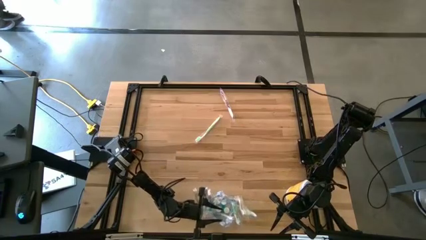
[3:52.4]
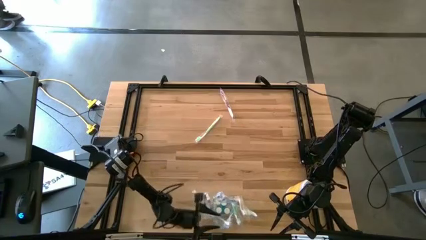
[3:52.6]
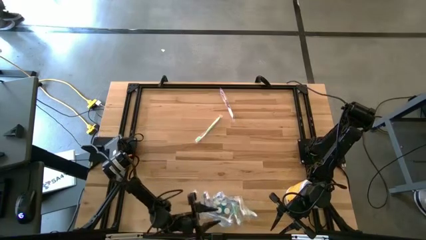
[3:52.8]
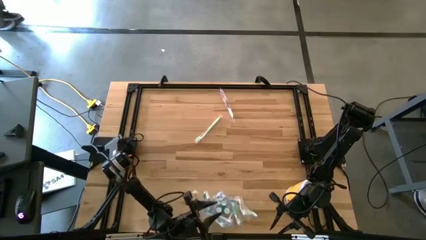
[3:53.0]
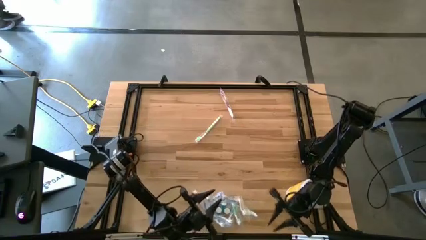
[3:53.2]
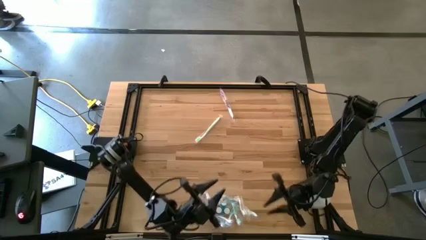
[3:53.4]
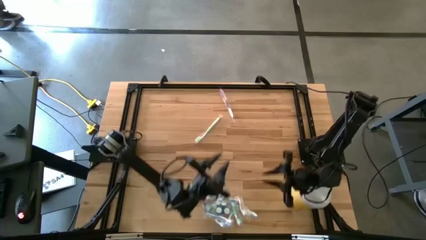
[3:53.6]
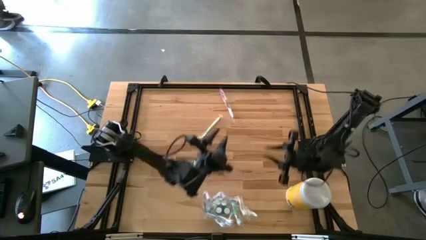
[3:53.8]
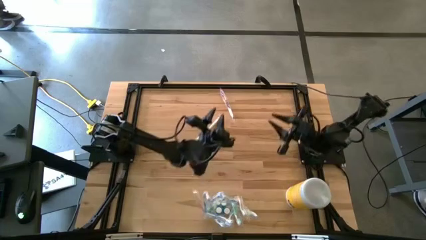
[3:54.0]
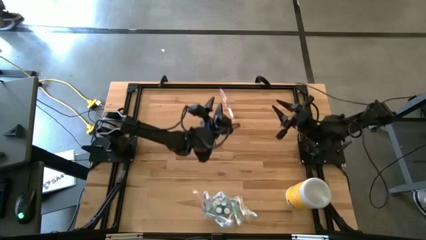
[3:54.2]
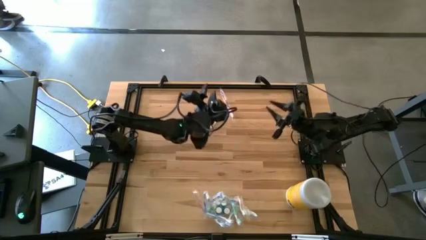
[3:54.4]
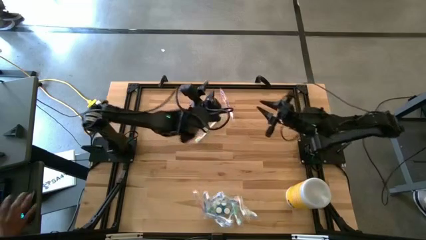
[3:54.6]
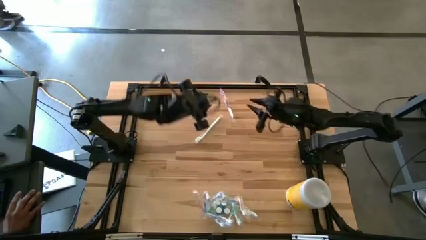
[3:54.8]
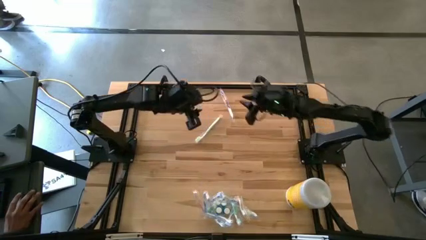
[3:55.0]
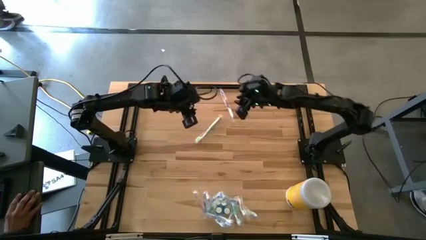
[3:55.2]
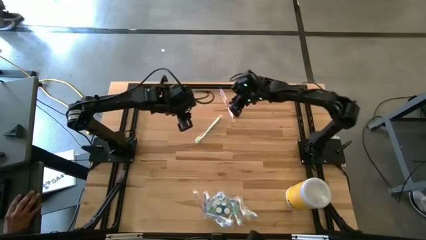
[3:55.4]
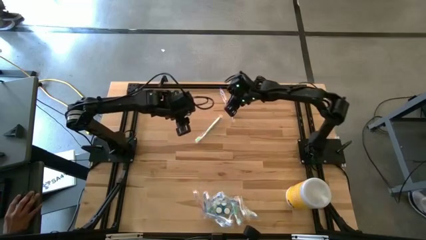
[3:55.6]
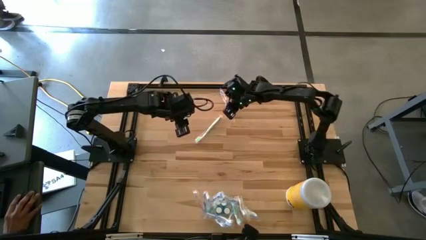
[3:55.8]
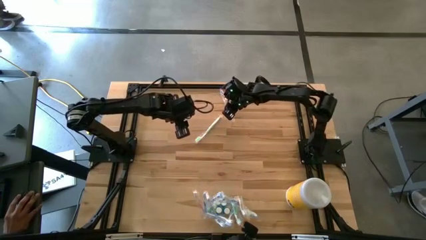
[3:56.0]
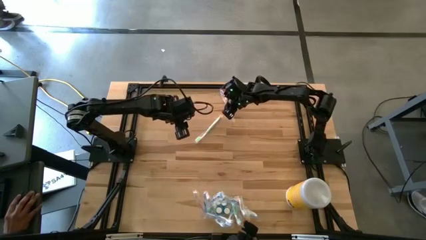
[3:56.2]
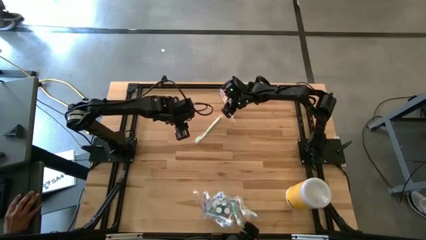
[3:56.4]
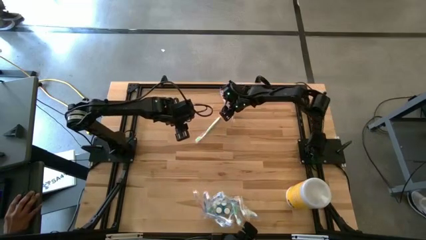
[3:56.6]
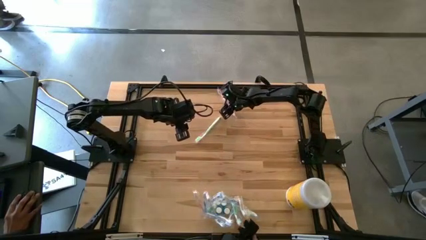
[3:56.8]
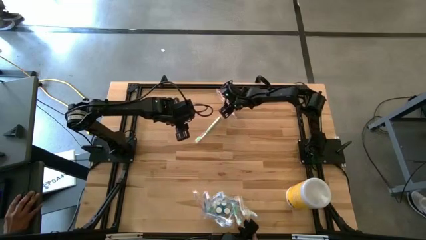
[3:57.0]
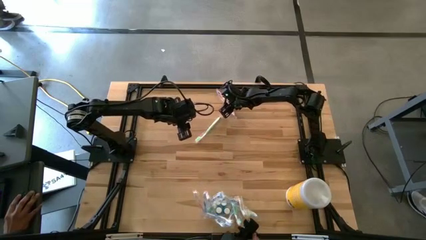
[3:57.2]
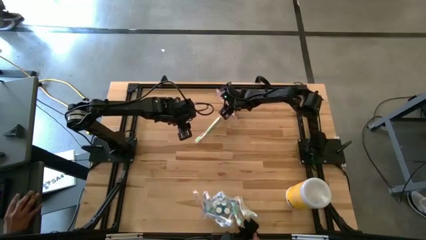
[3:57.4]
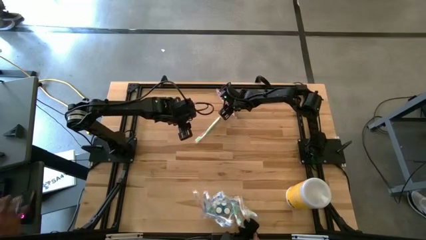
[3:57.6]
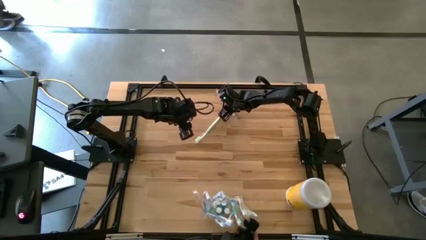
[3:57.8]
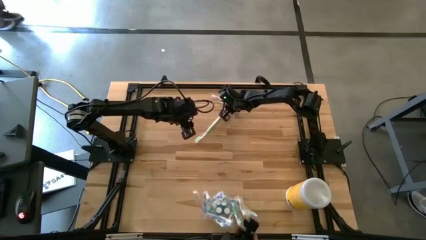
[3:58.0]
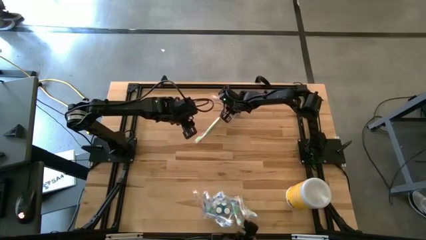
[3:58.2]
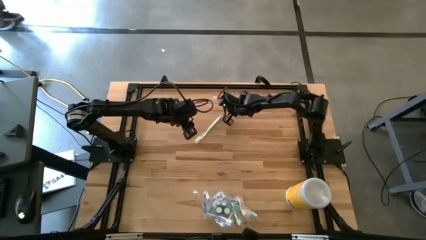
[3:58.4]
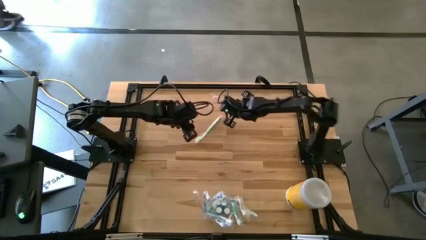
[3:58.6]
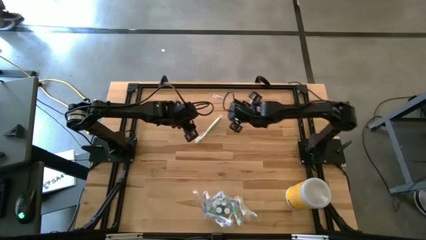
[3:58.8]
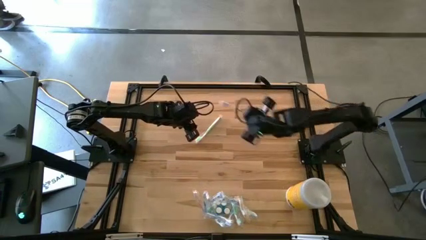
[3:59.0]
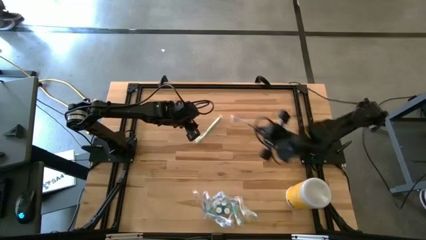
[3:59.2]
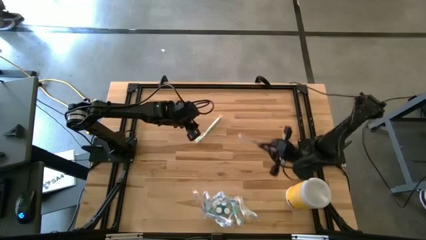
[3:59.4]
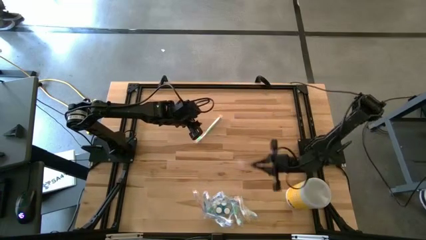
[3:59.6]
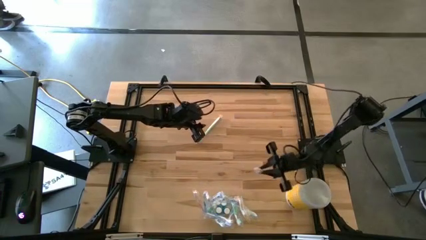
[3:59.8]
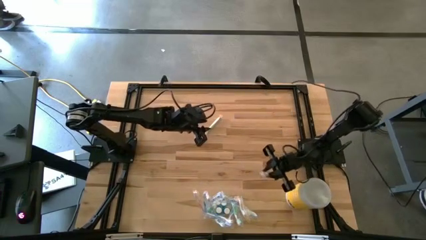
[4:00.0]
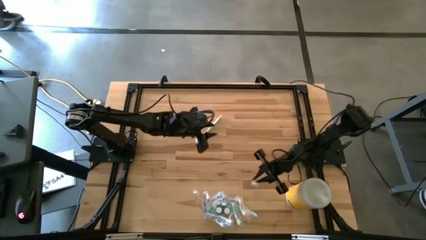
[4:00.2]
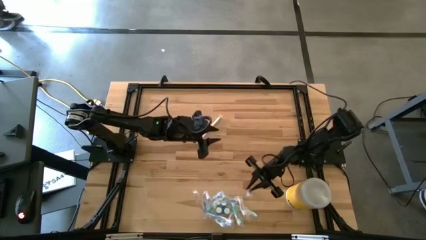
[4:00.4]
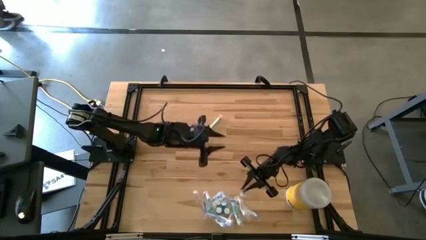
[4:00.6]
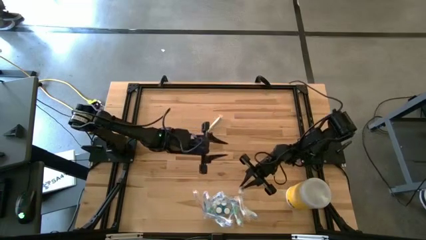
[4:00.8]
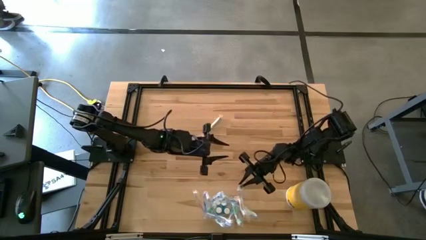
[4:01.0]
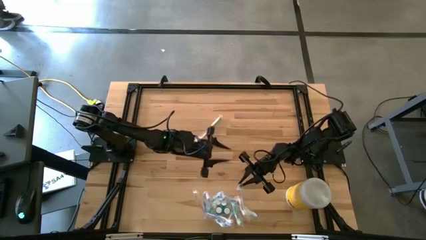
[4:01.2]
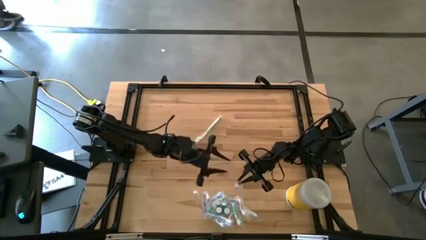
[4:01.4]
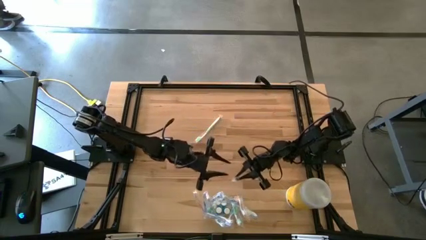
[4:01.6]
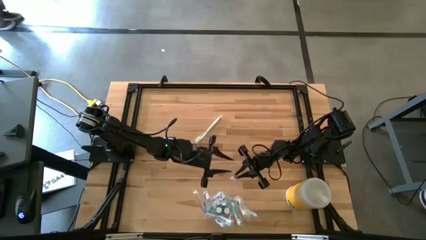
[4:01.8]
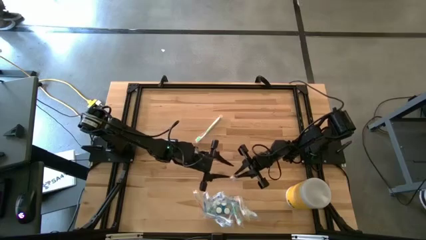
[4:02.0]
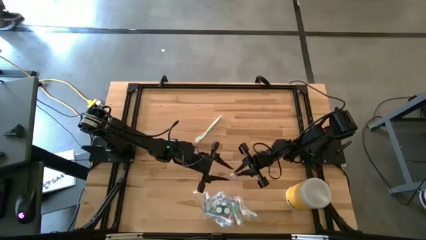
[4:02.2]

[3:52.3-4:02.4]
Task: Pick & Place toothbrushing station
Put the purple toothbrush into the transparent organizer

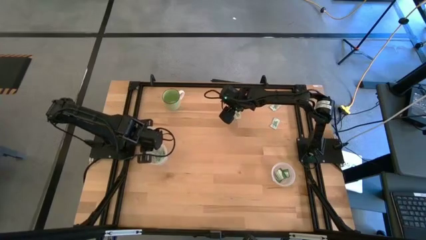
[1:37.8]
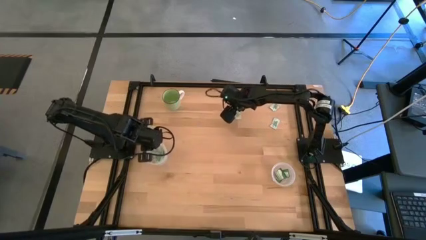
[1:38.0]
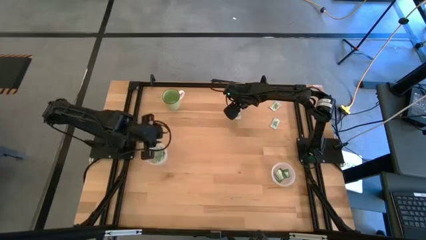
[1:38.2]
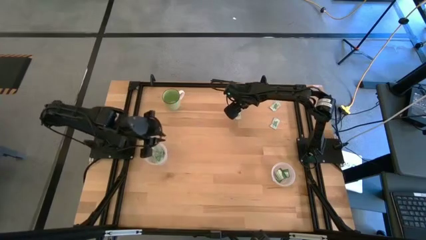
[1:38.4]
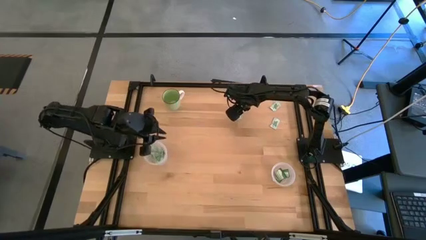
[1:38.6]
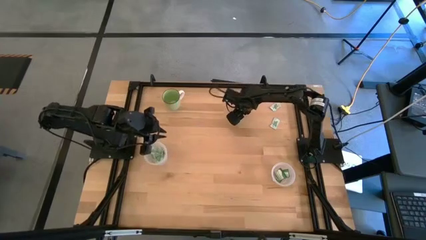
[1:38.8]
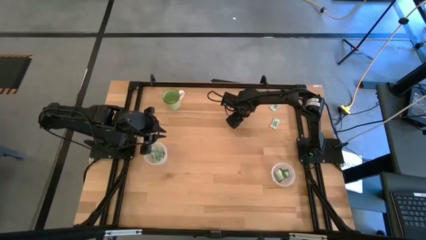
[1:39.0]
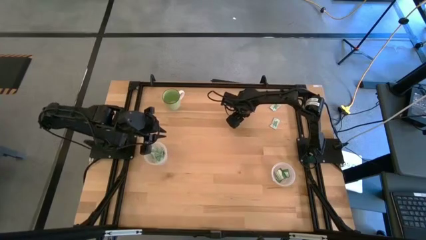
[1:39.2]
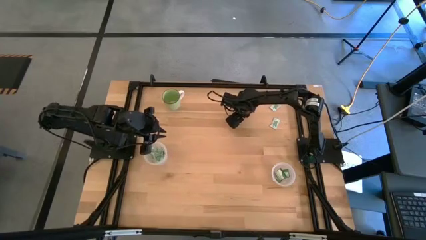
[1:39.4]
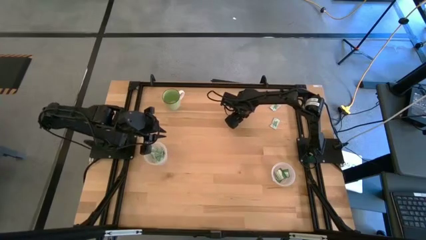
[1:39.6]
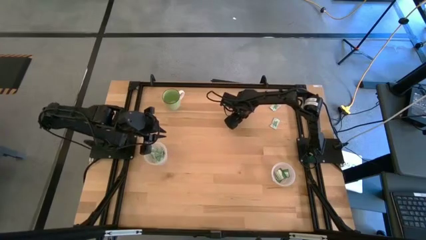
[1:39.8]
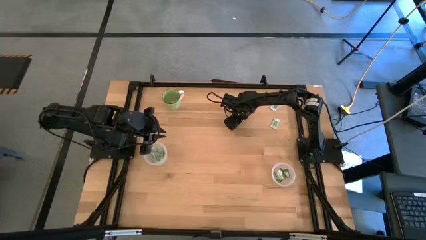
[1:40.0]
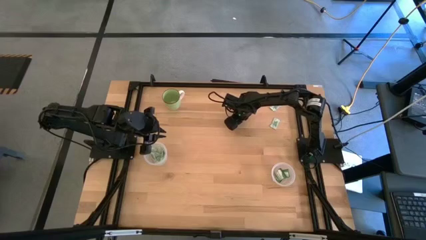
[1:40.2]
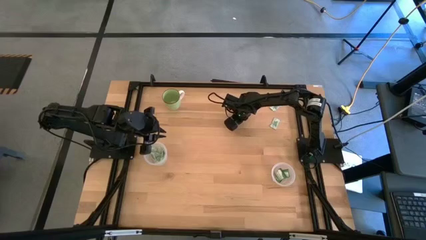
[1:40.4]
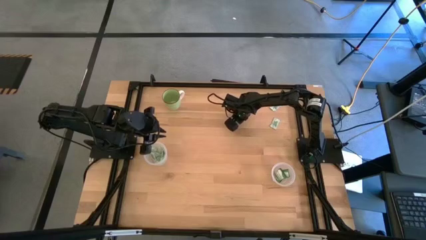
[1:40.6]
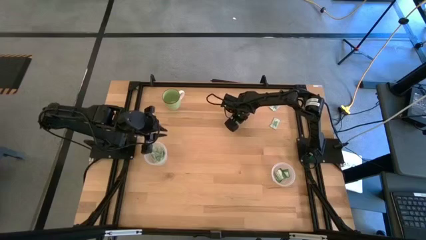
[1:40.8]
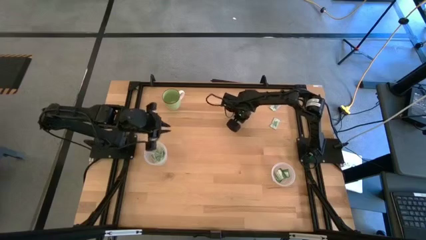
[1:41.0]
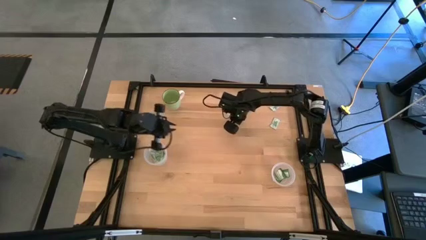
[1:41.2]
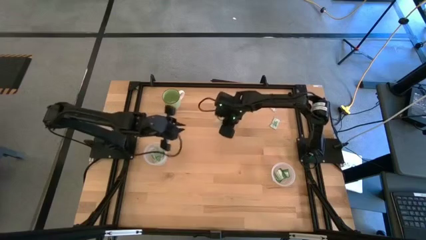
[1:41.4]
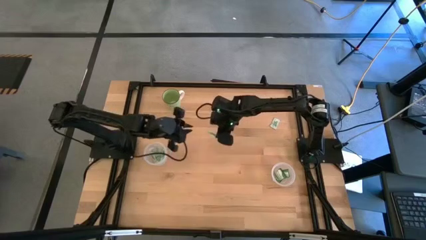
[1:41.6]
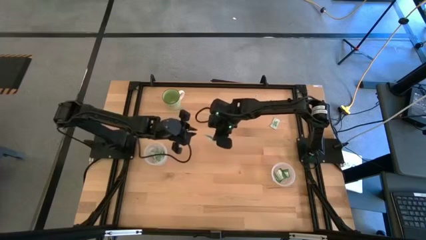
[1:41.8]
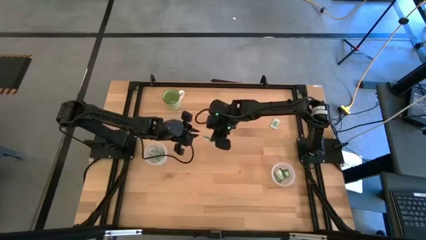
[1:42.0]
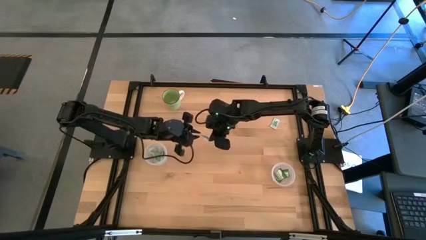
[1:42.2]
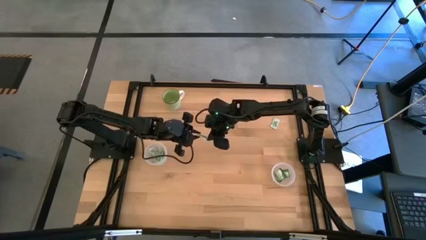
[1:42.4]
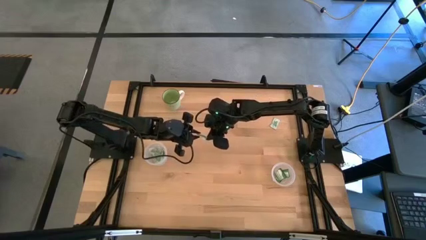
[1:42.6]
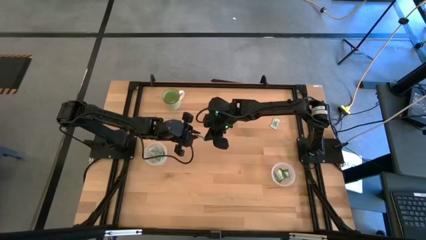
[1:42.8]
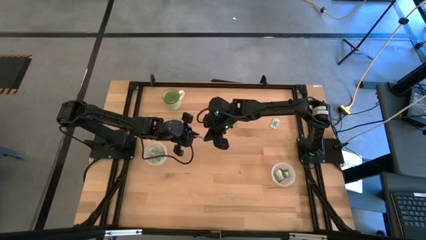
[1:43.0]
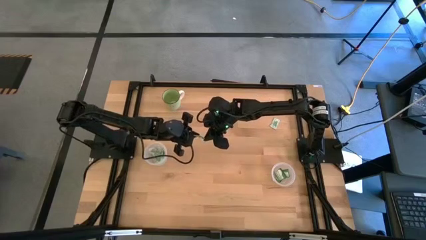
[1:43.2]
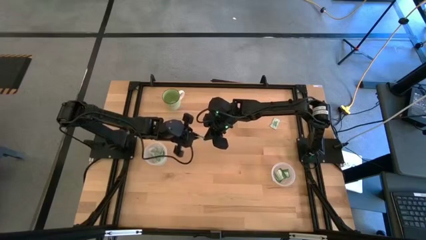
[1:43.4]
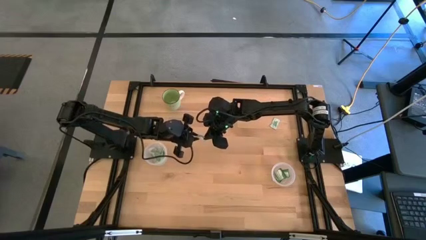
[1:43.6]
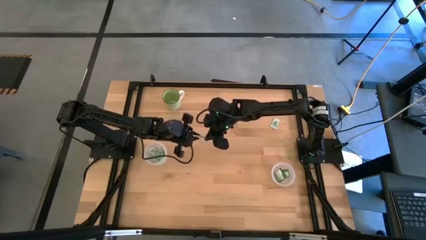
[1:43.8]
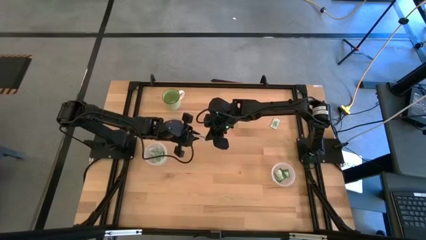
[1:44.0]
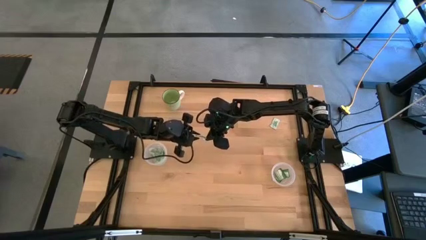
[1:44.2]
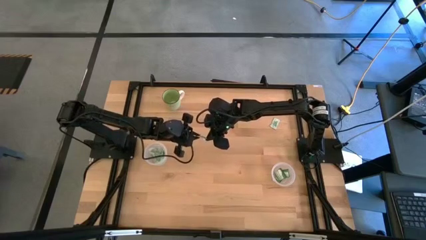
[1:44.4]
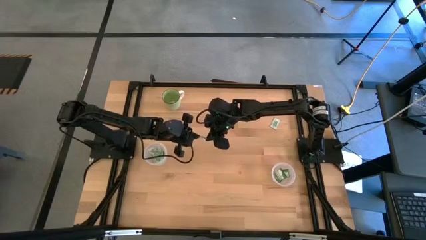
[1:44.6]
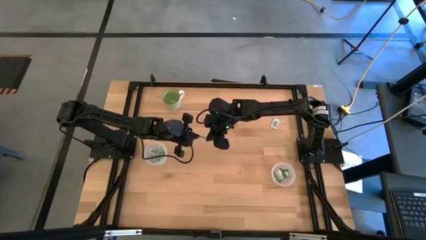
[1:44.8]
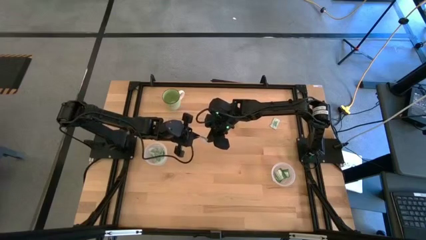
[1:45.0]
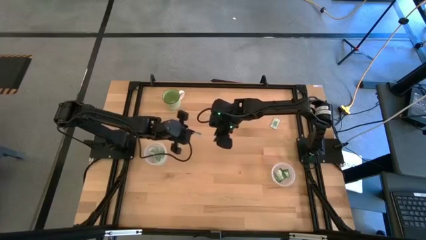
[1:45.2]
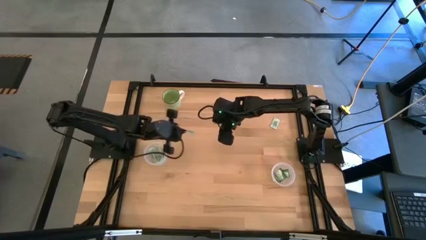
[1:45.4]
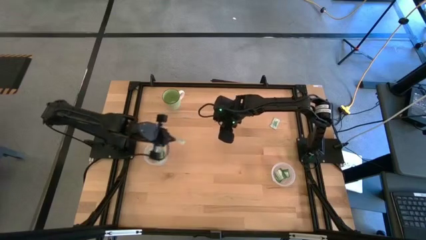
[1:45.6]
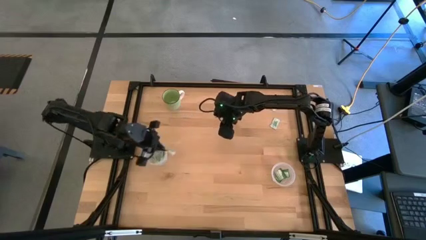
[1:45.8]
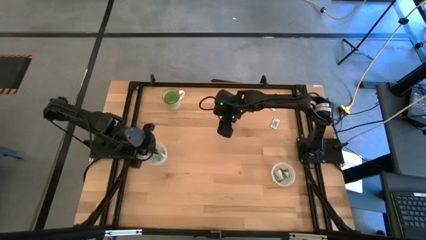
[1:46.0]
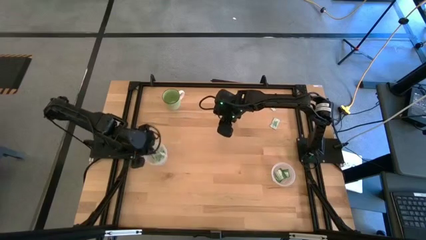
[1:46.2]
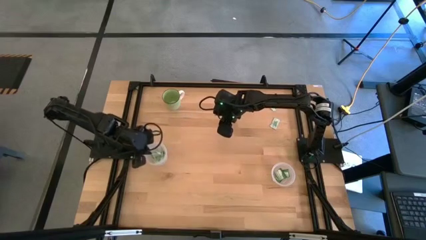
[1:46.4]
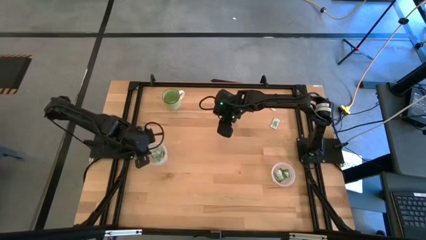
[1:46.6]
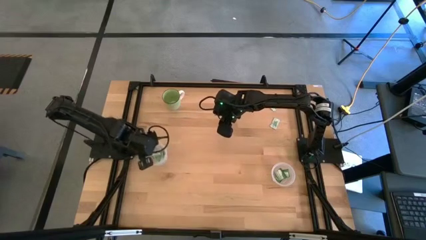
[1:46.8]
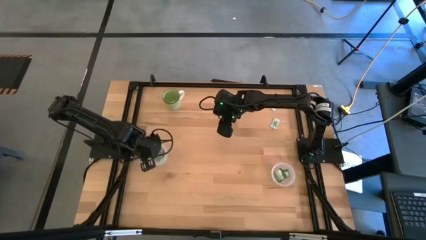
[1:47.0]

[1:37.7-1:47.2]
Task: Pick and place items into bin
Put the stevia packet into the left transparent bin
